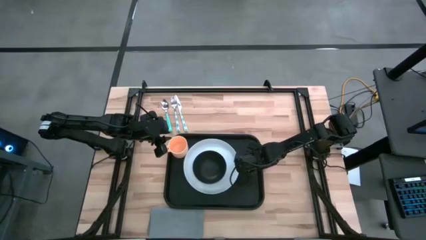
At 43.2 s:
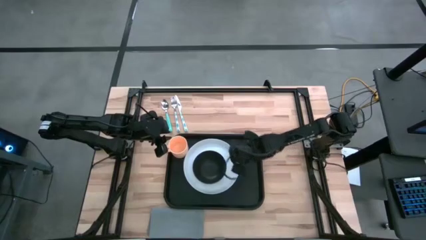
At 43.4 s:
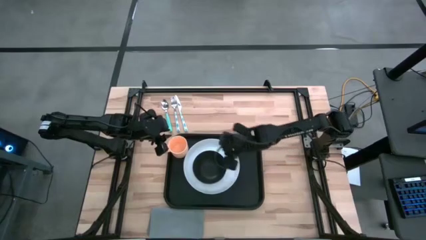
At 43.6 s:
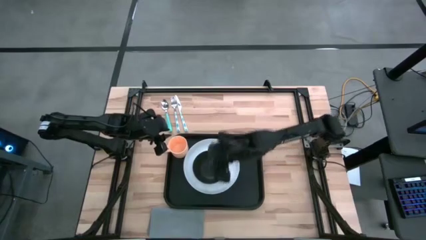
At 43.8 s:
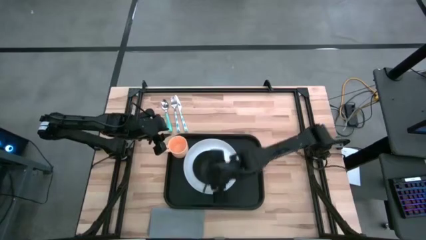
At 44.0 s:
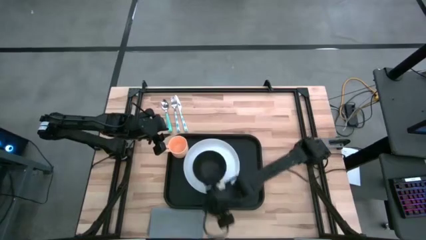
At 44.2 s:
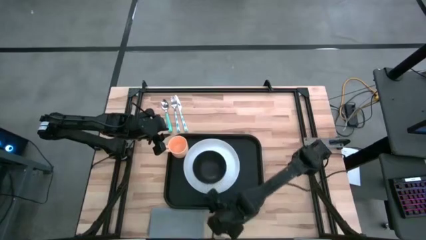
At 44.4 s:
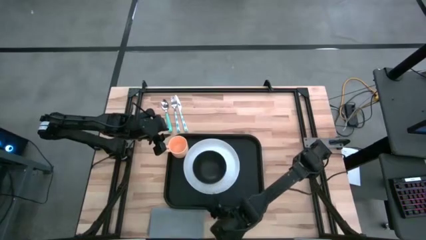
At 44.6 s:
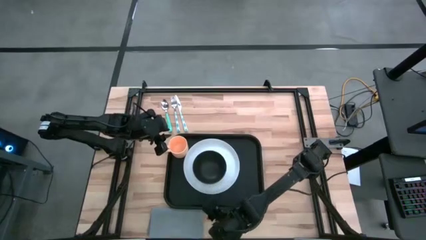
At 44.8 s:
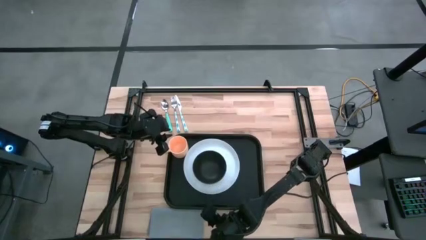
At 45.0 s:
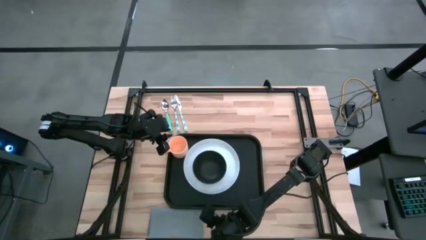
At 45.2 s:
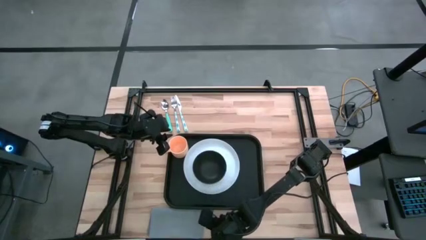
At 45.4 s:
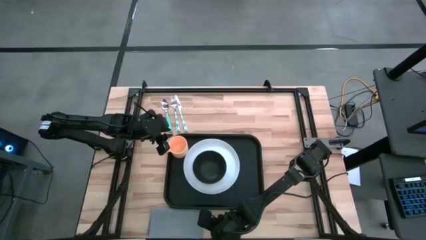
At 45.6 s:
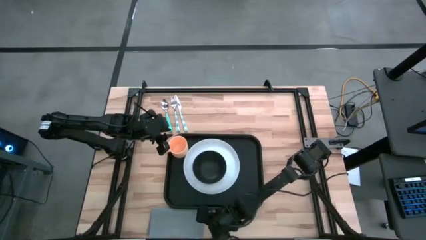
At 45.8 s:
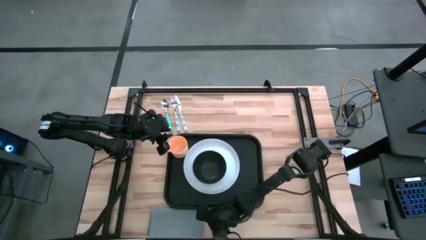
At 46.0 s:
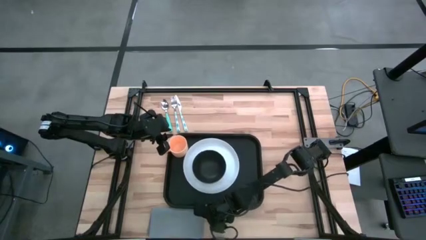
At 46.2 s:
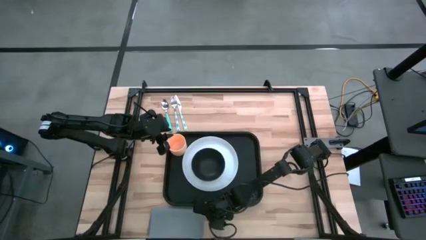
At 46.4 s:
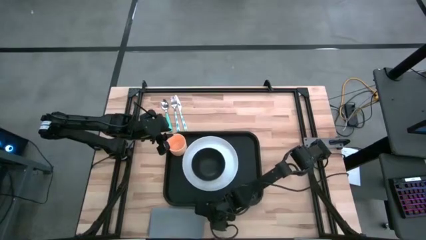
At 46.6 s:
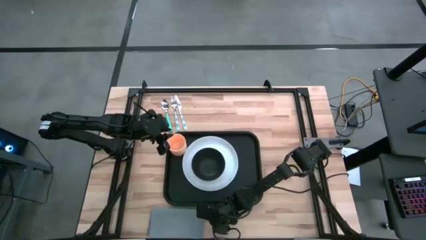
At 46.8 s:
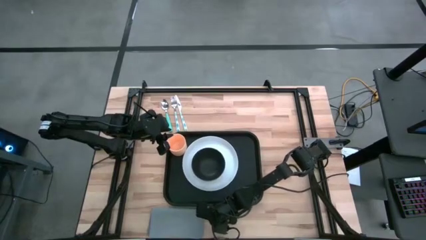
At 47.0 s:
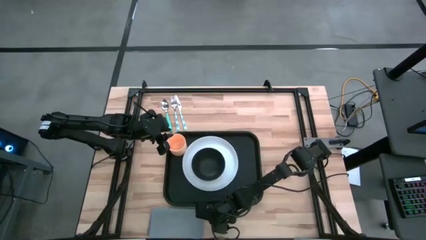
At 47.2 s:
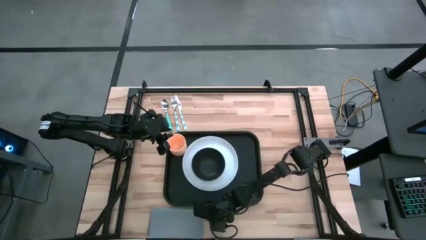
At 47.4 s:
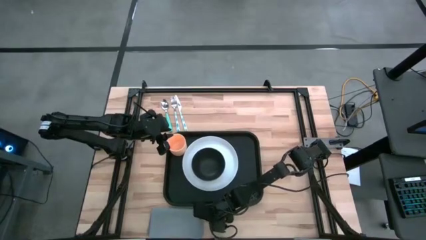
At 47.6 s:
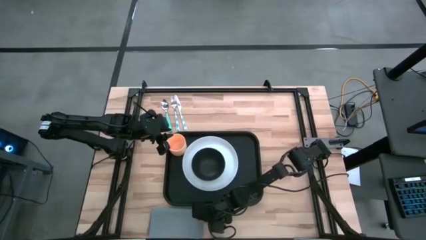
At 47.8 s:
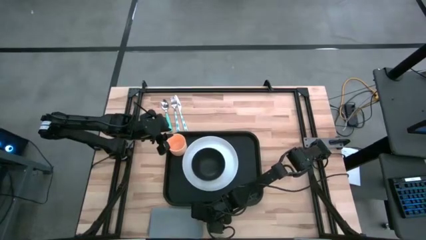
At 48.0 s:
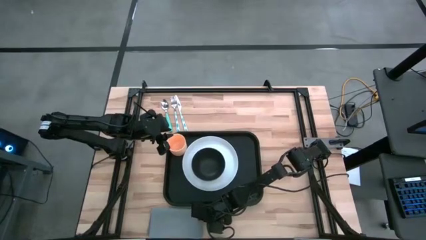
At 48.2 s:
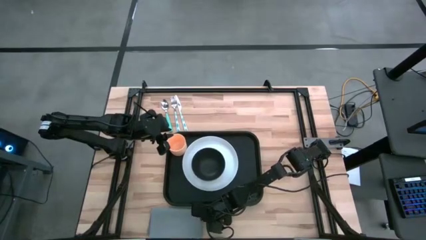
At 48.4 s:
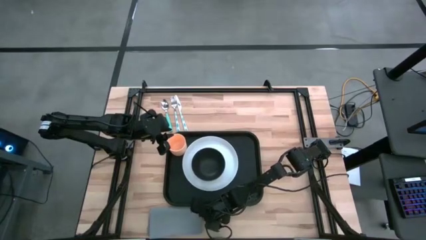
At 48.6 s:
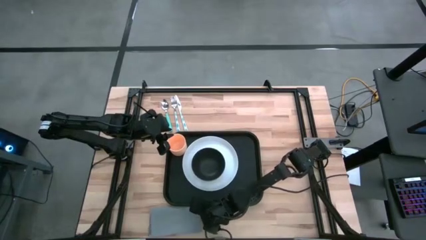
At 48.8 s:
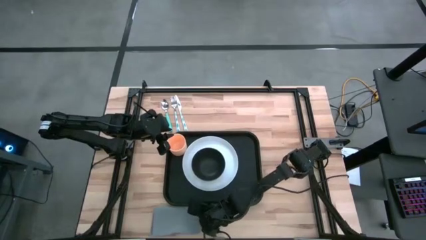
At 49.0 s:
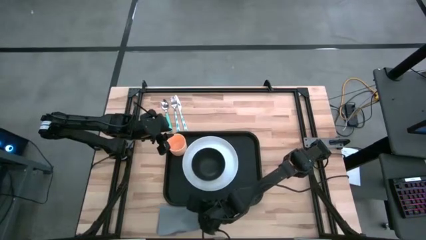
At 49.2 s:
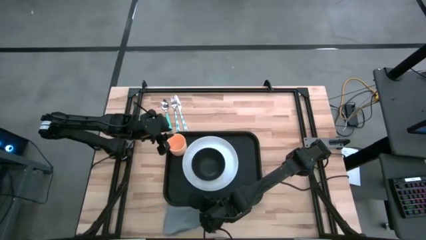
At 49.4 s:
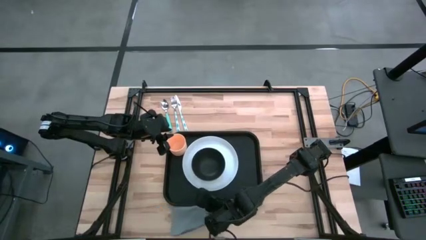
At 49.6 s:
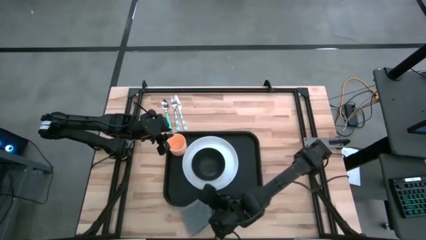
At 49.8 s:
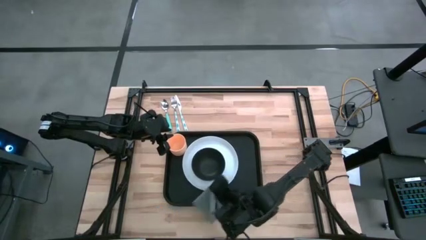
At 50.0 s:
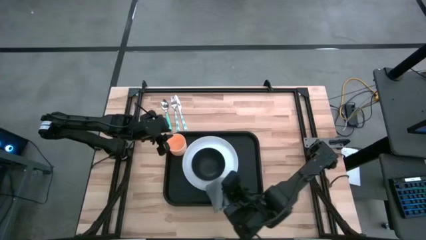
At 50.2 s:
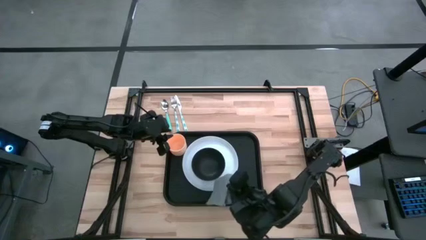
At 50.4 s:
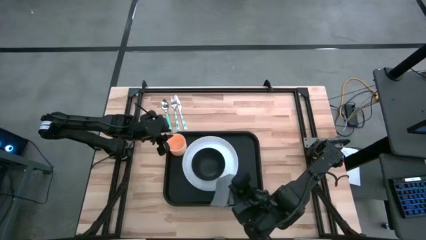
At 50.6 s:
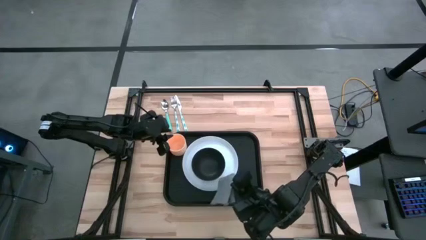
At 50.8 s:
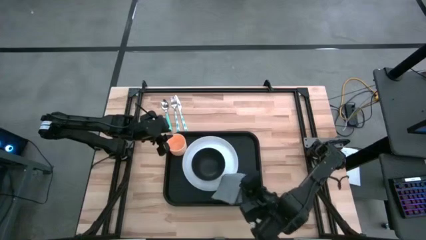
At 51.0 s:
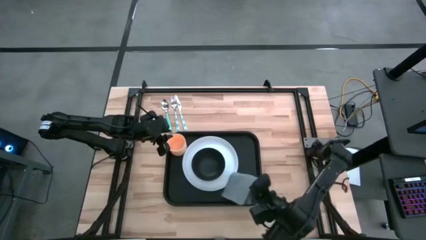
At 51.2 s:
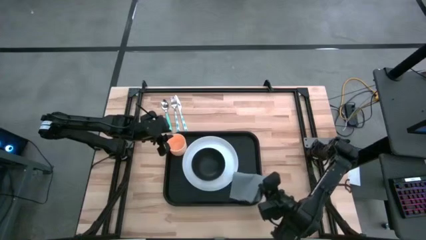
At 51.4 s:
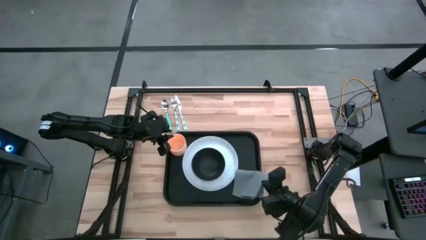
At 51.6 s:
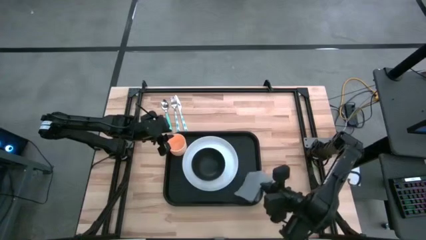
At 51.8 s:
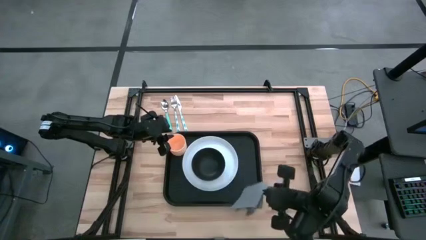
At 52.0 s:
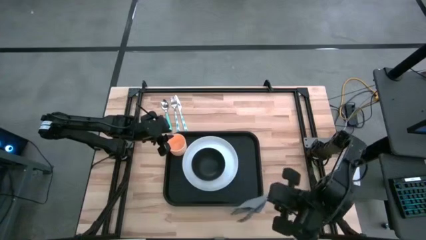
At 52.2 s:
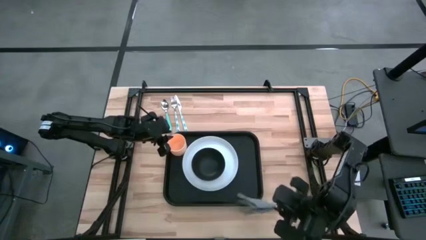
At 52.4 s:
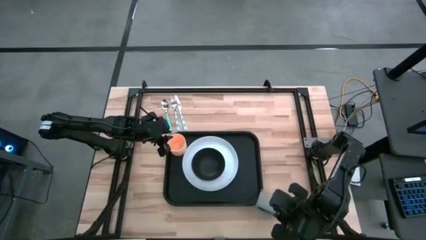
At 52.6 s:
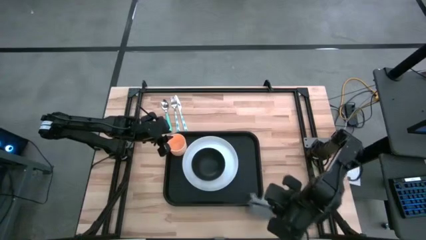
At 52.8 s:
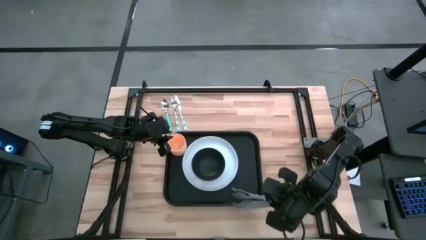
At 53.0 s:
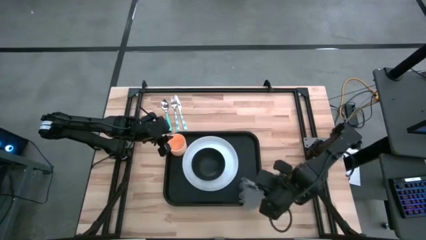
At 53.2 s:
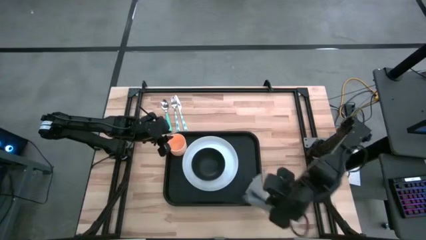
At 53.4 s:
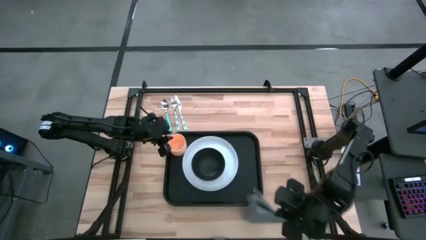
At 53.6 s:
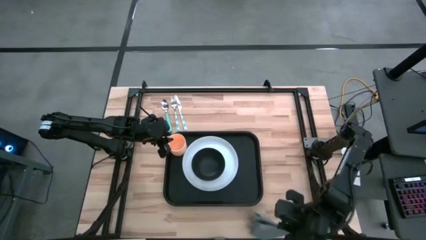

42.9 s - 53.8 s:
Task: Set up tray
Put the gray napkin to the right of the white plate on the black serving tray

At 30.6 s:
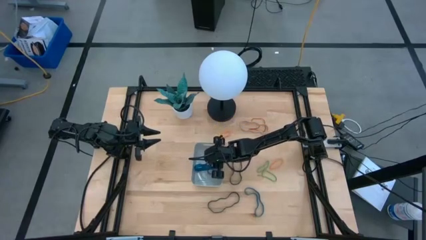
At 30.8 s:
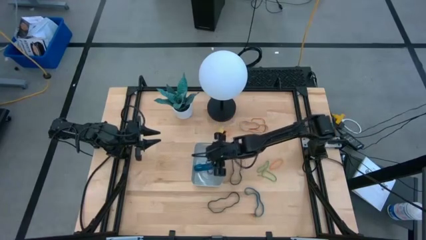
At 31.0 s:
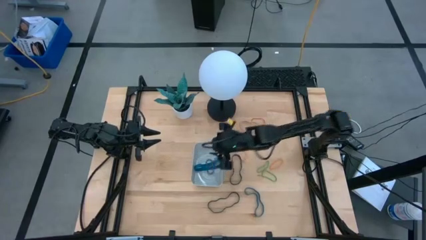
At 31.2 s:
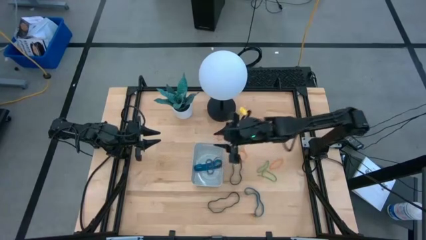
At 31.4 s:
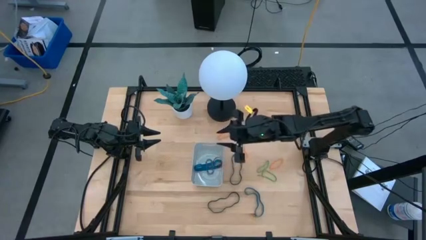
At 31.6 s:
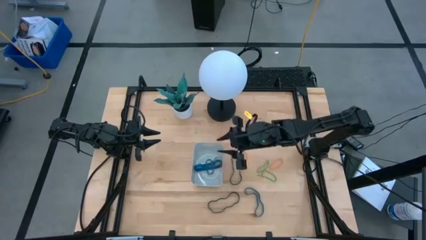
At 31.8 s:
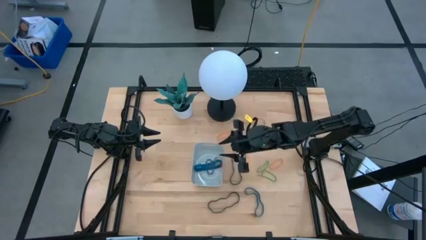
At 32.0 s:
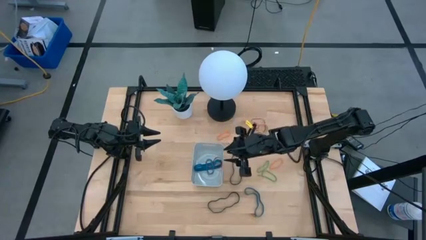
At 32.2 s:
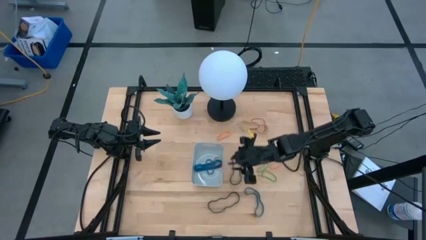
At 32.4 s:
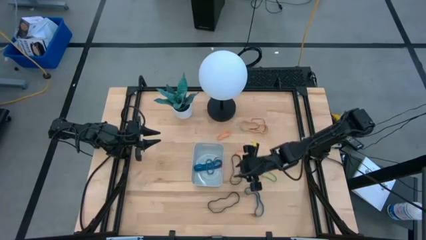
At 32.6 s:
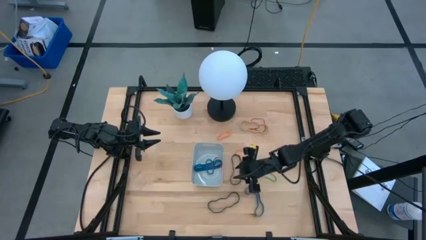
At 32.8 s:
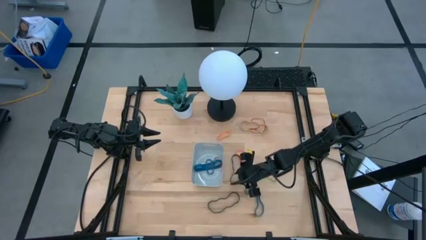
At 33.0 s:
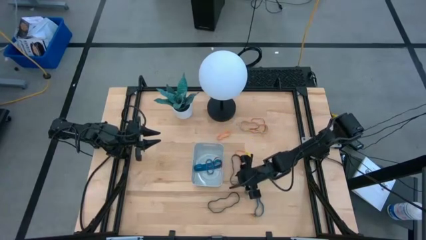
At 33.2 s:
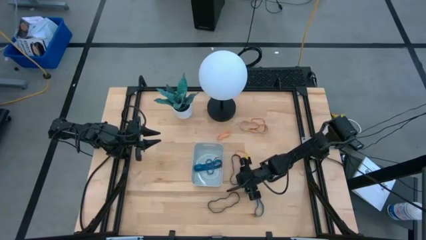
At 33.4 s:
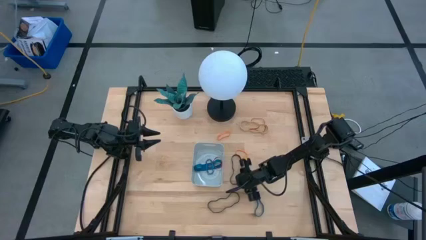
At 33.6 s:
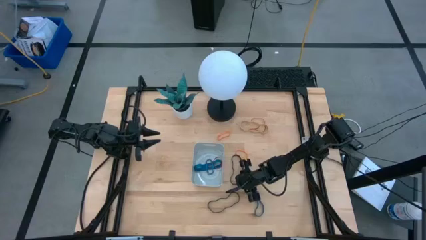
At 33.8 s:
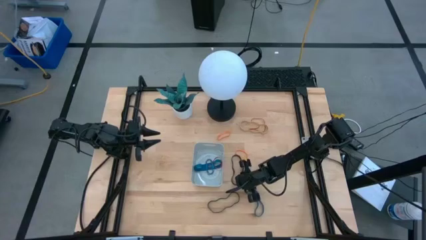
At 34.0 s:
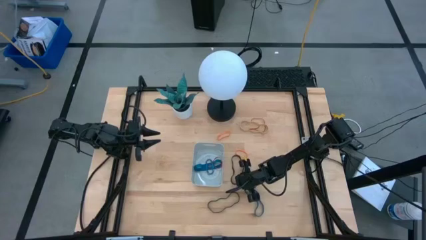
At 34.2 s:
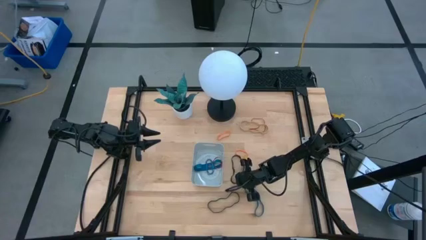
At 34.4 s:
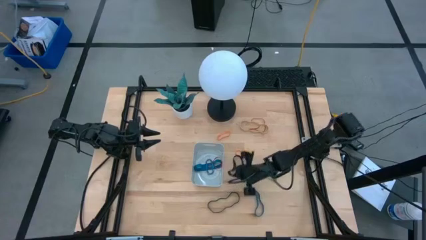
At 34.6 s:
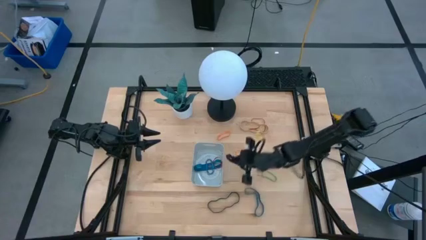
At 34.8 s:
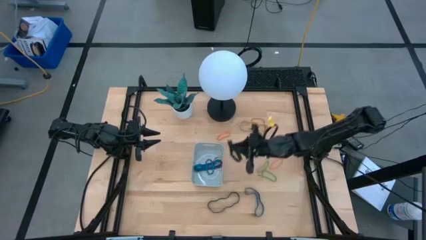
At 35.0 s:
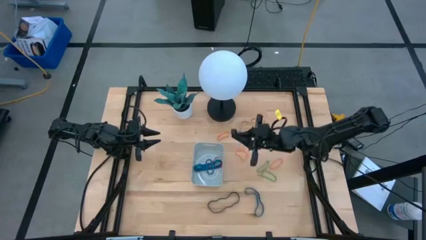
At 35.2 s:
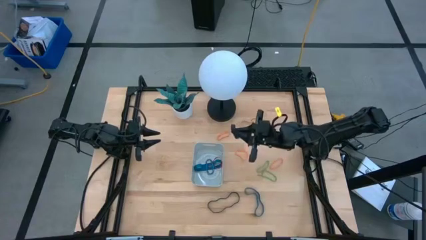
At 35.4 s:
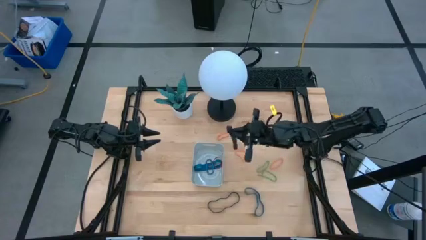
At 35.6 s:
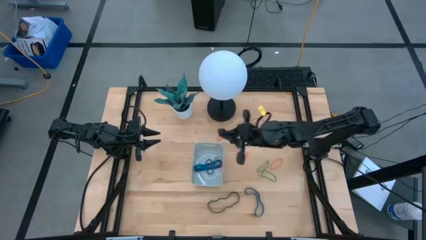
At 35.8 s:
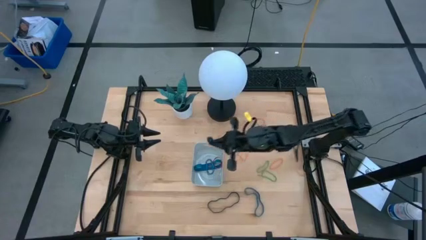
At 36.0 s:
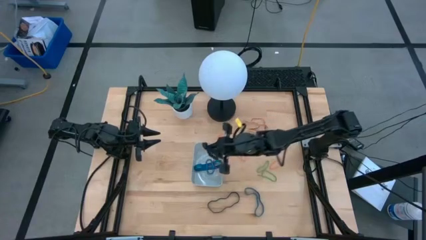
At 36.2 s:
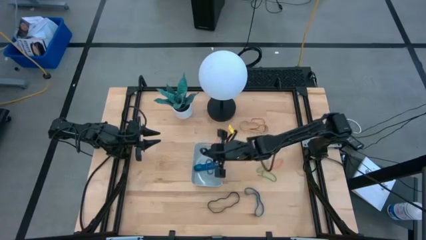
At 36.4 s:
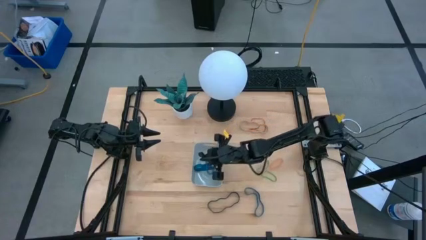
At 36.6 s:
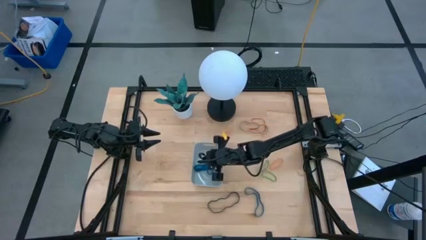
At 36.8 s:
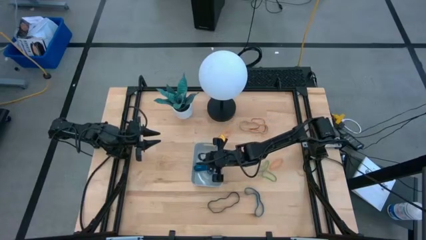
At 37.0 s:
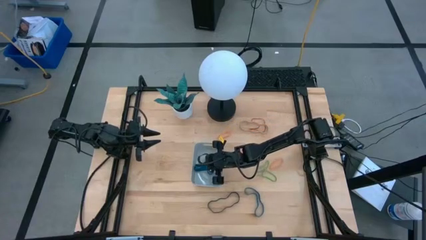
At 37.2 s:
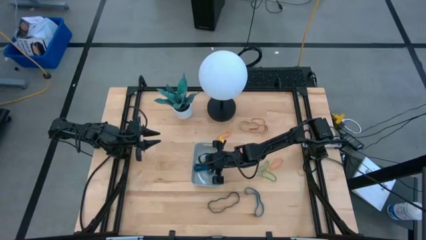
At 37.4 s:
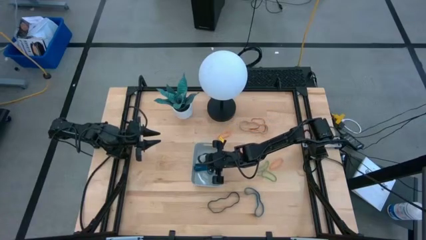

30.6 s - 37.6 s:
Task: Pick and place rubber bands into bin
Put the top black rubber band into the gray bin
